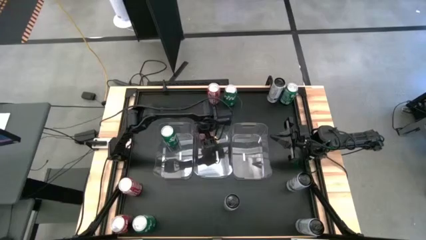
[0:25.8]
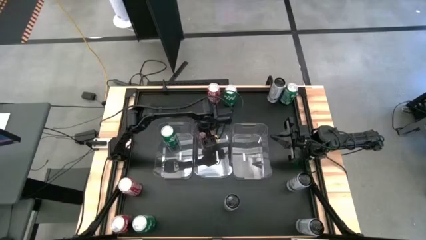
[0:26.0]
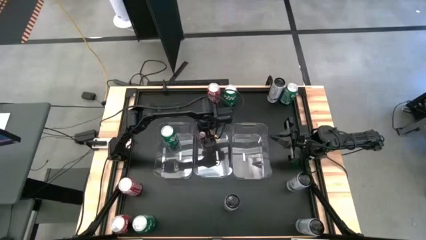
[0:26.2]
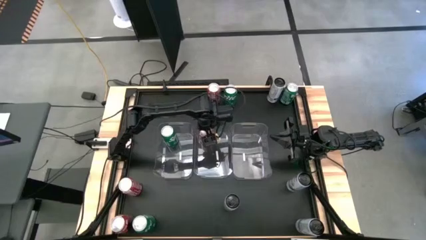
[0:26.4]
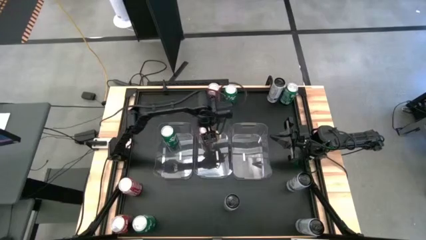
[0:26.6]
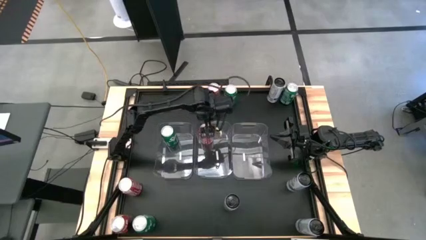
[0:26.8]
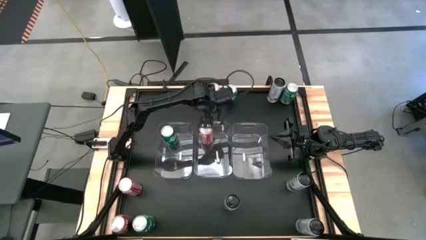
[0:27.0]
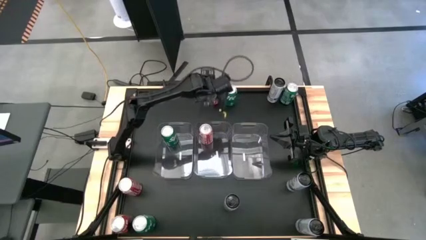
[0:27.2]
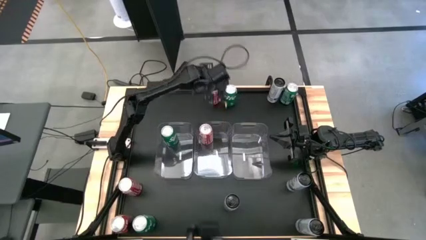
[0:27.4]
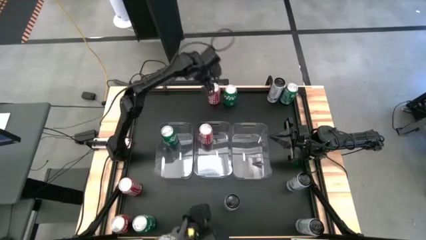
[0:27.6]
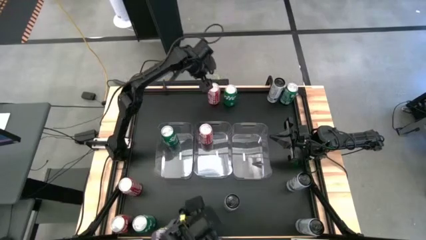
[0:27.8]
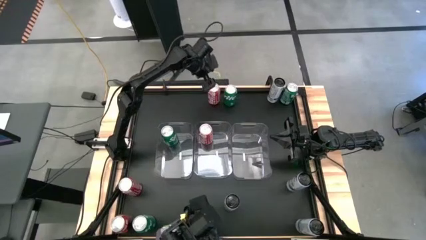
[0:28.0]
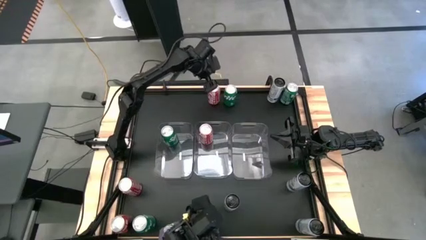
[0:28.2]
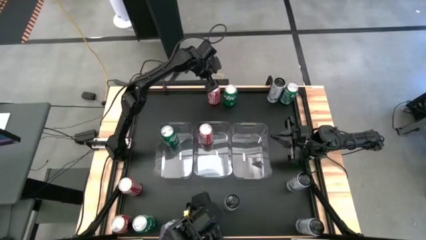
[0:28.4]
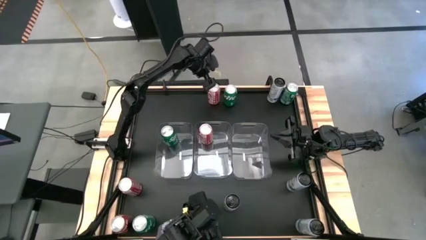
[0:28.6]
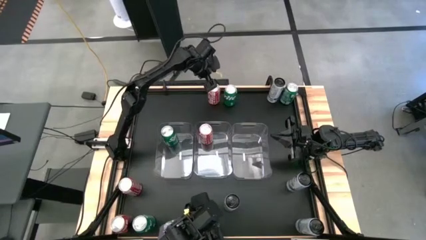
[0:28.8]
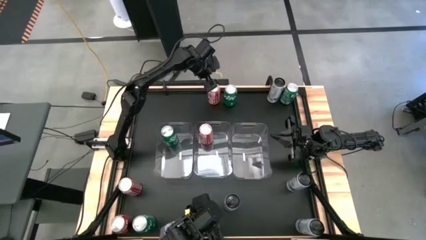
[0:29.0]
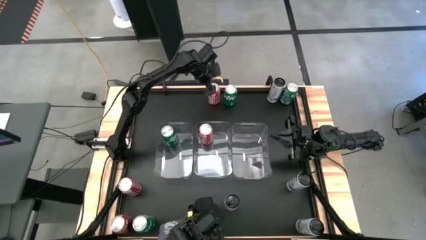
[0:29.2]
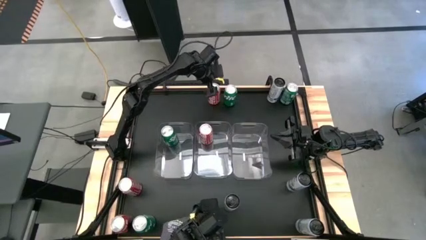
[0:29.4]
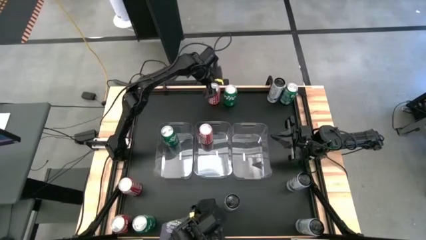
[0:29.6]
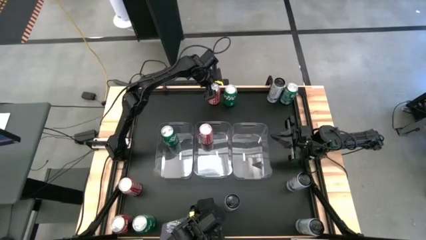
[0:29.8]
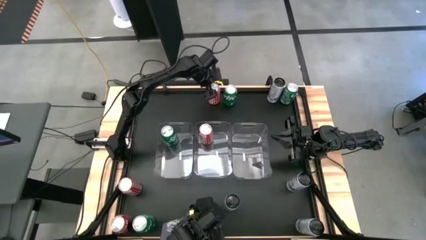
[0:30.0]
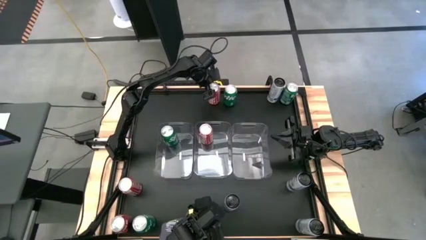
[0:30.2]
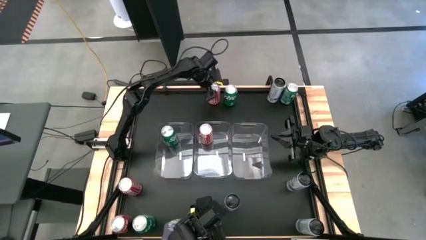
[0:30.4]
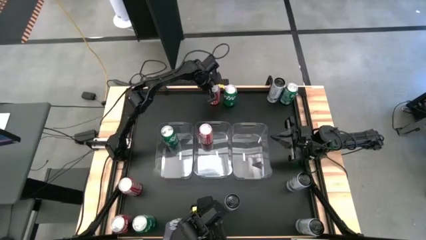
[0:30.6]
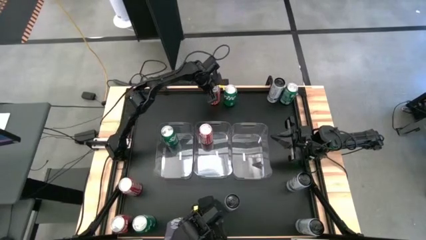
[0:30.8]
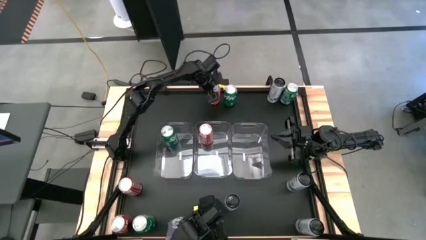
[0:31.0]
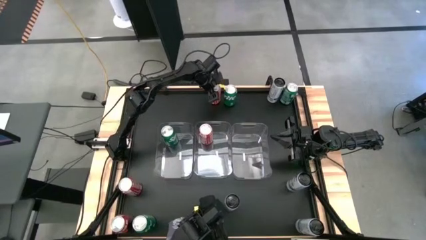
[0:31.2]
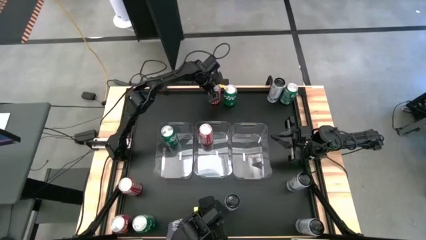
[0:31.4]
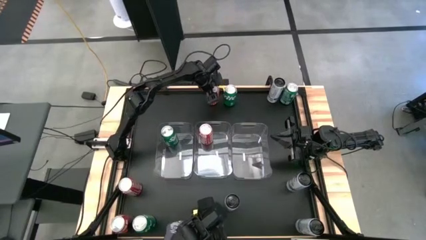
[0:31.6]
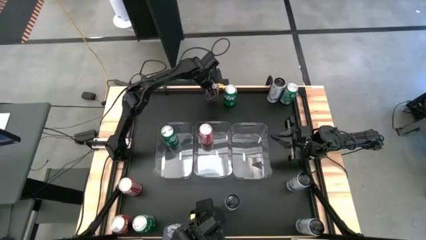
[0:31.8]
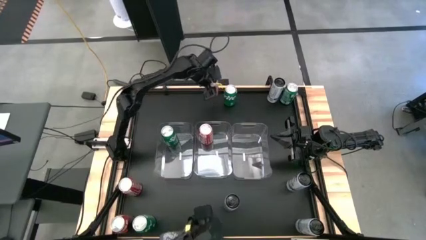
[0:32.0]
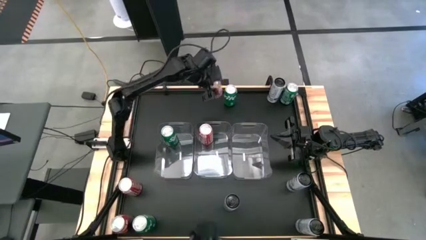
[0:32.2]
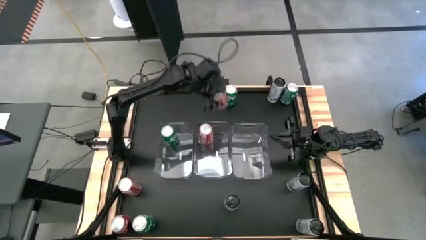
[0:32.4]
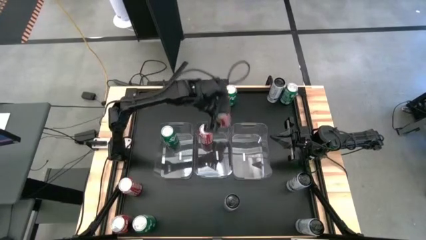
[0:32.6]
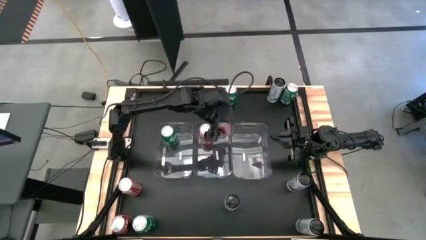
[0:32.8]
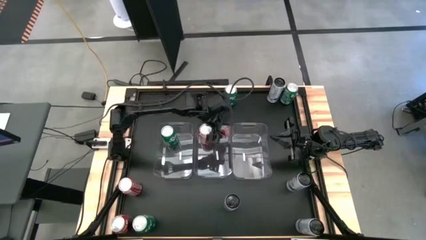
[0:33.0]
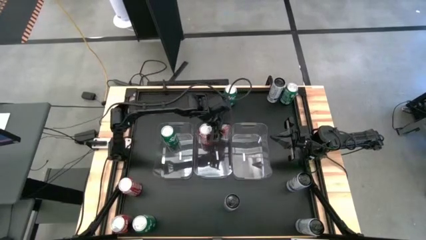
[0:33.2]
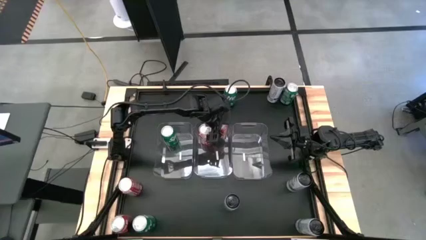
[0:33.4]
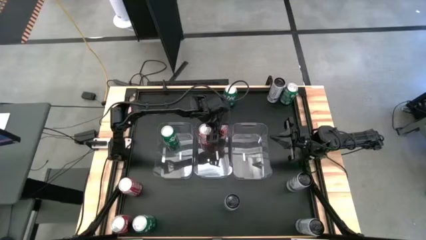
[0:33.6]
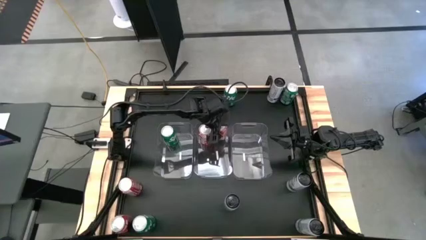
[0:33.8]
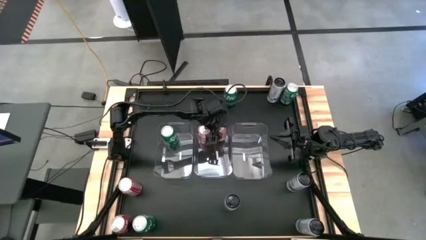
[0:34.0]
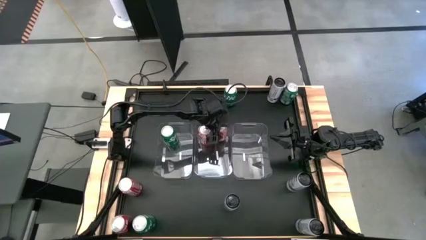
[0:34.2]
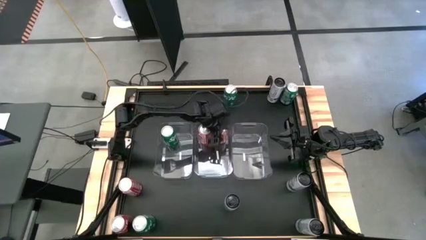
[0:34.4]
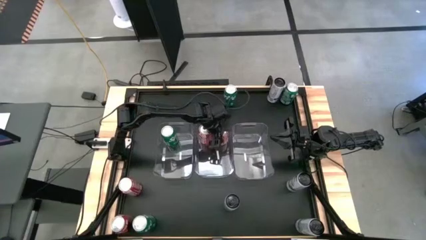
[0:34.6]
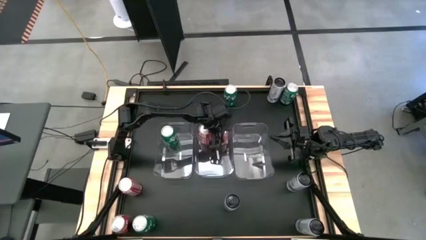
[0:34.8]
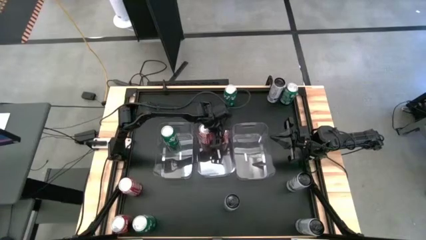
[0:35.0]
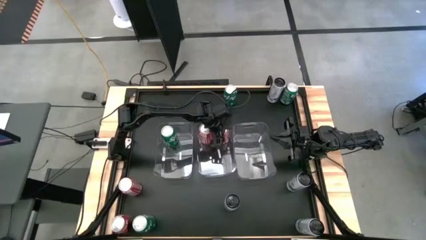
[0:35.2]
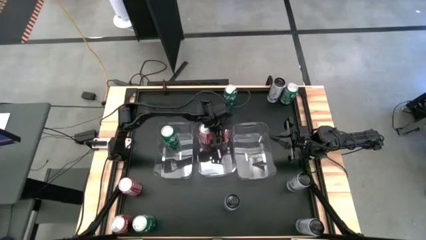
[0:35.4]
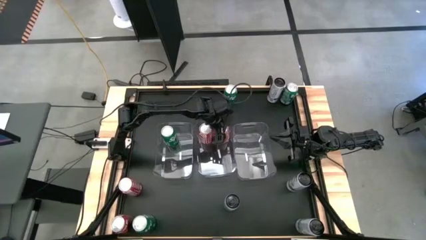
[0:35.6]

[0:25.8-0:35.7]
Task: Sort soda cans
Put the top red soda can into the middle transparent bin

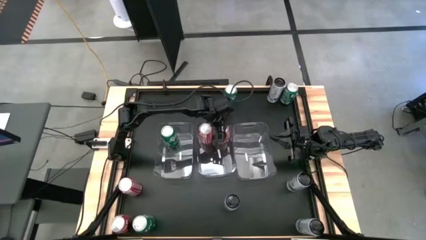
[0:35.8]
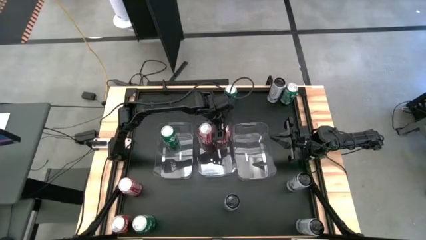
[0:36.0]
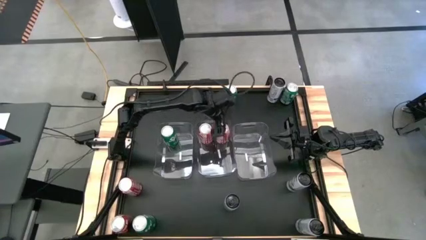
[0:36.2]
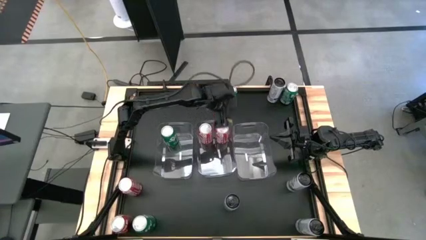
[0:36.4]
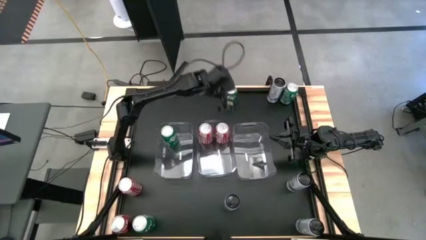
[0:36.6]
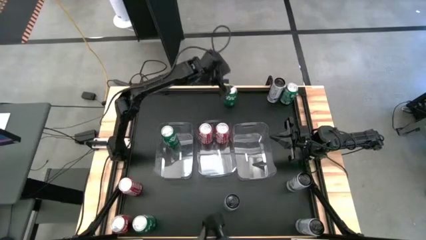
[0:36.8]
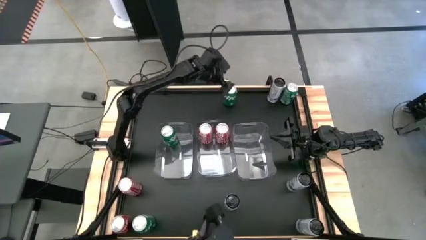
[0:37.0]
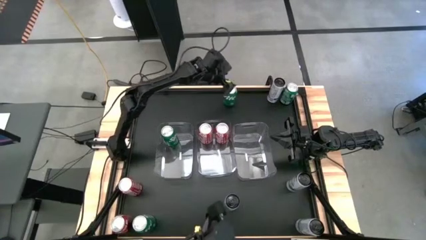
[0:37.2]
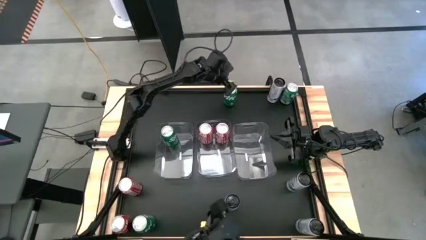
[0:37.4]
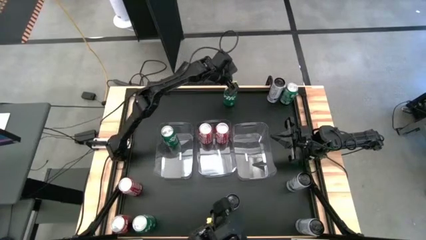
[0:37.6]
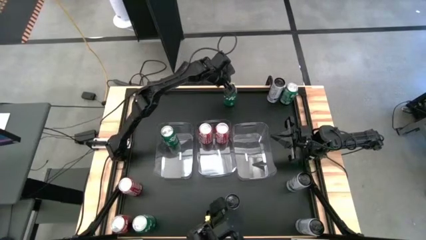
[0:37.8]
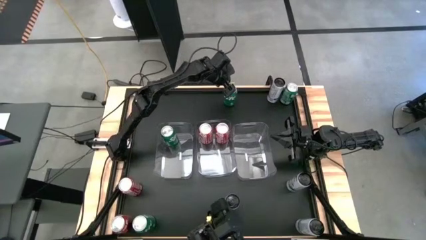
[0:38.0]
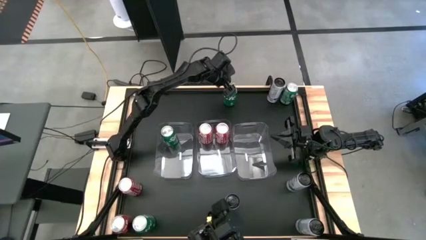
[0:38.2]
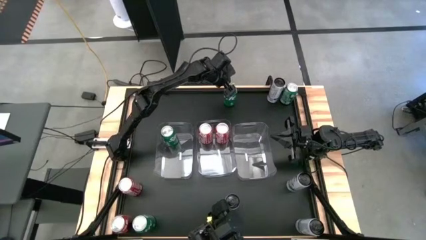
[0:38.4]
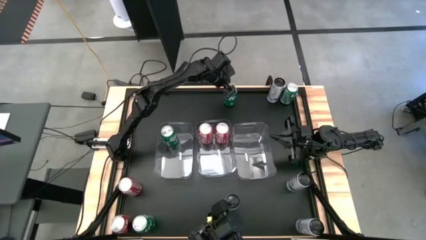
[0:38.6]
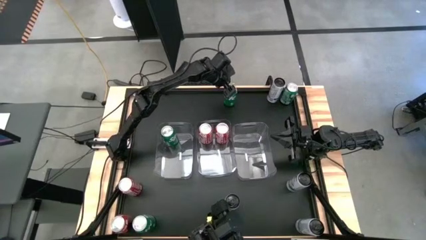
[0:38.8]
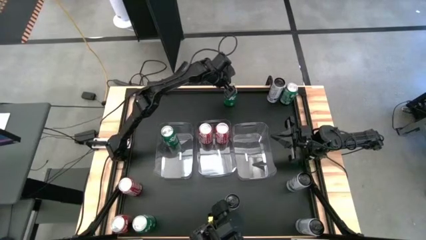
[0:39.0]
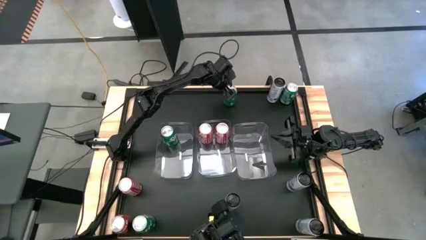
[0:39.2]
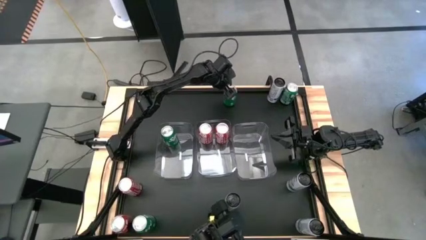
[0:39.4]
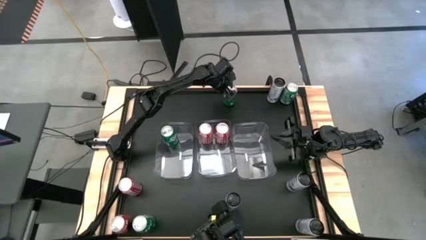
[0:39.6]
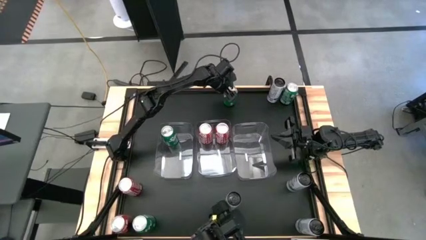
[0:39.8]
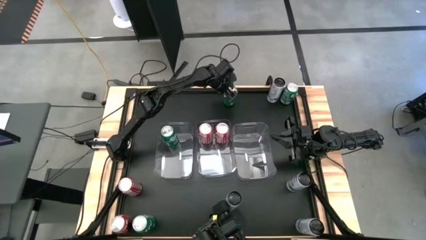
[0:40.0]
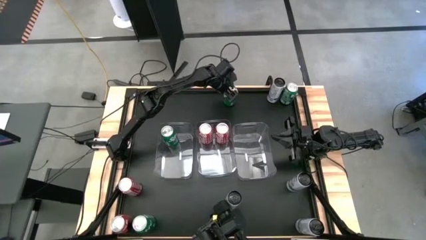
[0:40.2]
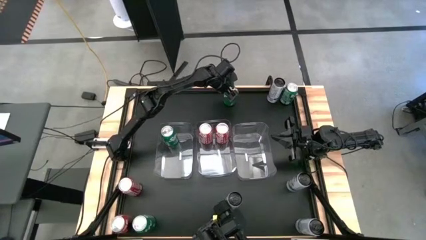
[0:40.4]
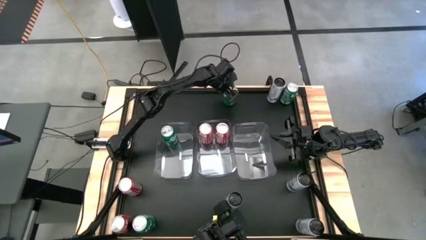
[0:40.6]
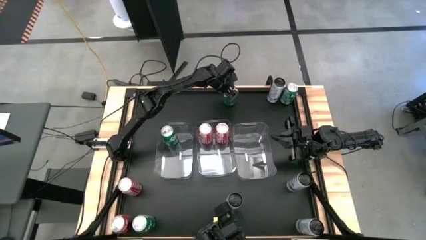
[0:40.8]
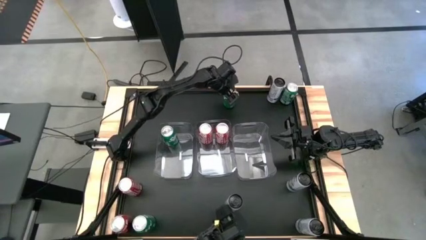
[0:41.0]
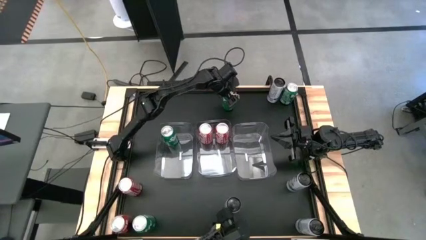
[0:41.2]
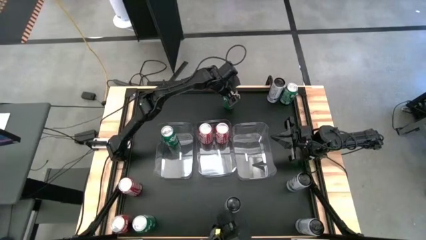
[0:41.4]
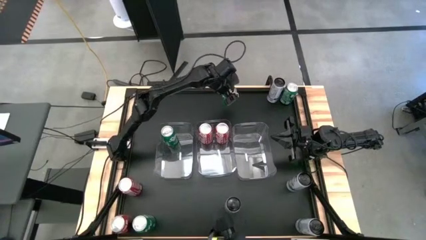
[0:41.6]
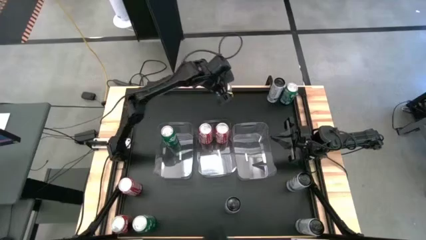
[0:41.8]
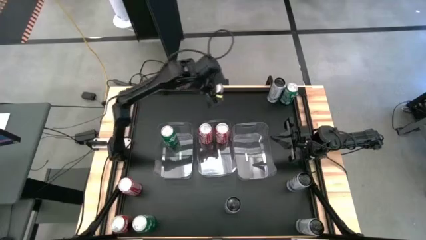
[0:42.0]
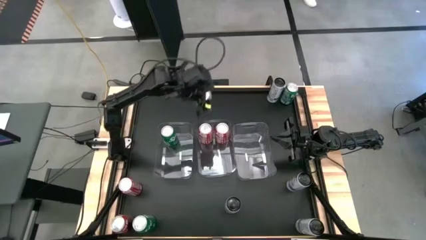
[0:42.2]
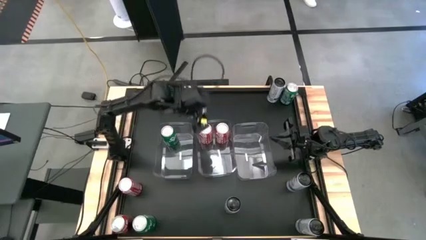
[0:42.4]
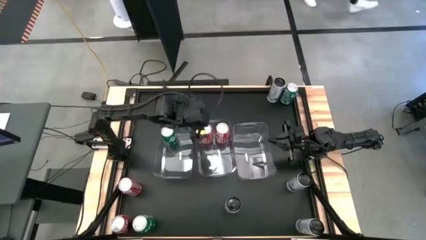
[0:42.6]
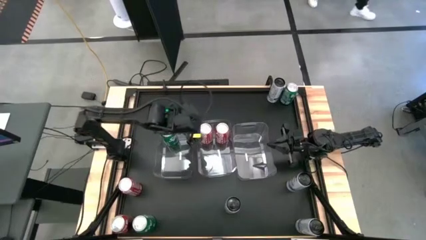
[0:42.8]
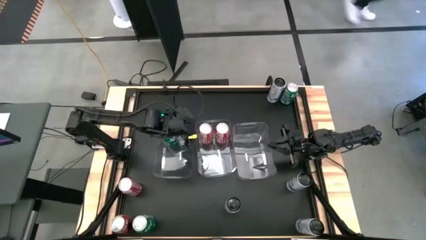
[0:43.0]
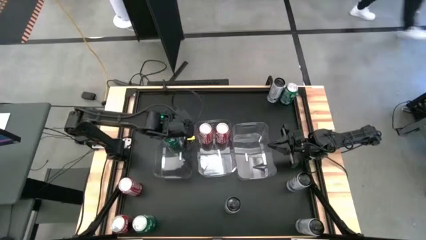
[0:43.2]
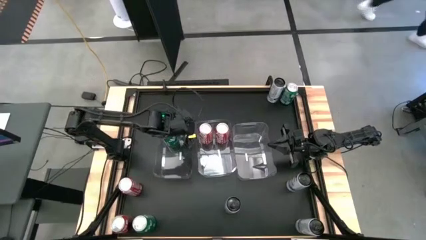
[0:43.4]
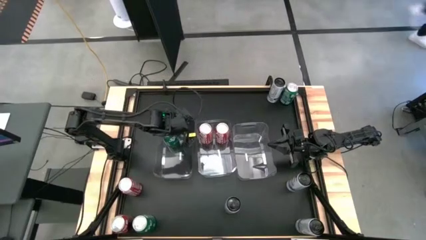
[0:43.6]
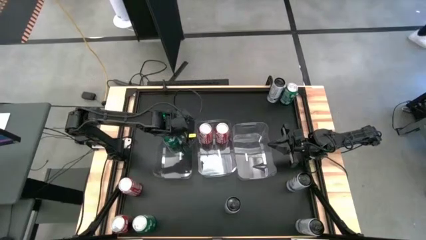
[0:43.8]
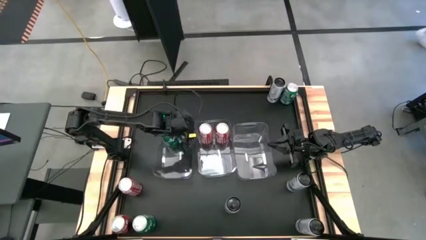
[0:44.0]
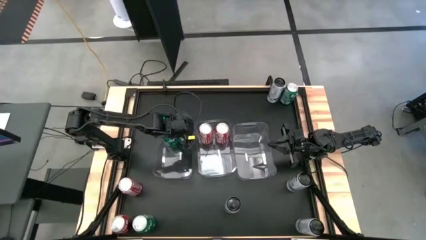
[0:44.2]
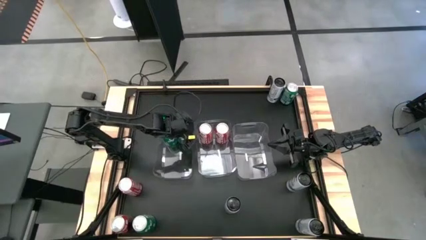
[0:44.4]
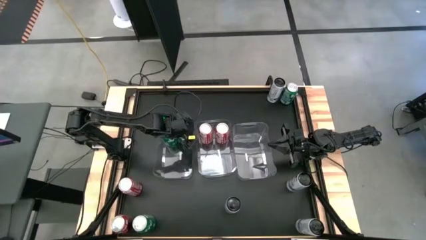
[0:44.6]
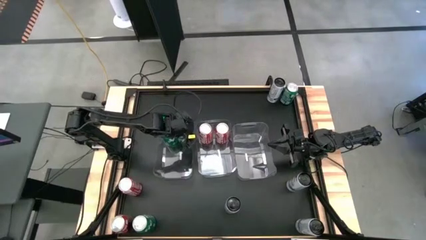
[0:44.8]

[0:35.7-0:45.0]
Put the top left green soda can into the left transparent bin
